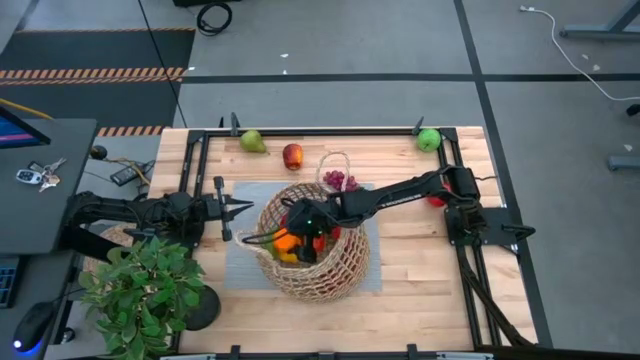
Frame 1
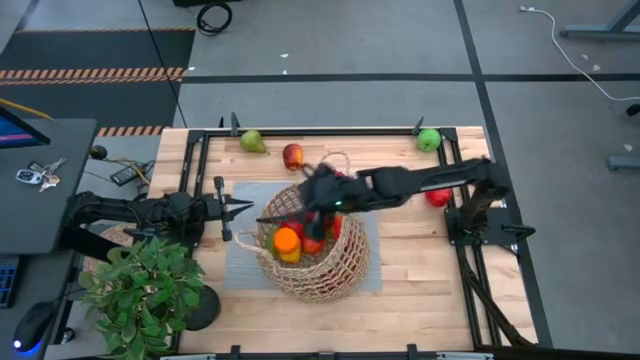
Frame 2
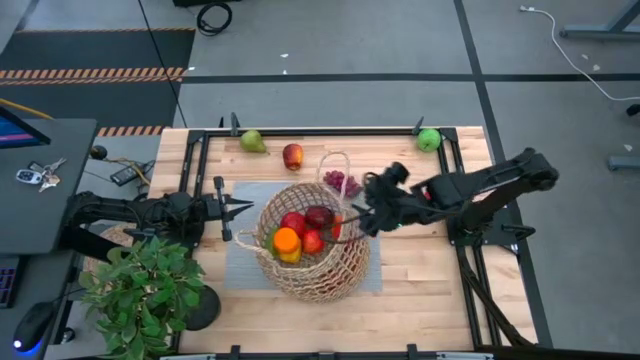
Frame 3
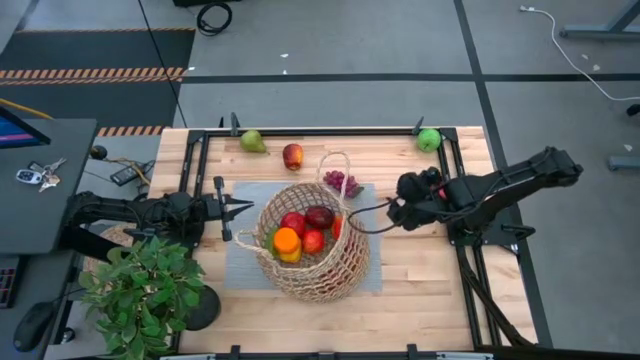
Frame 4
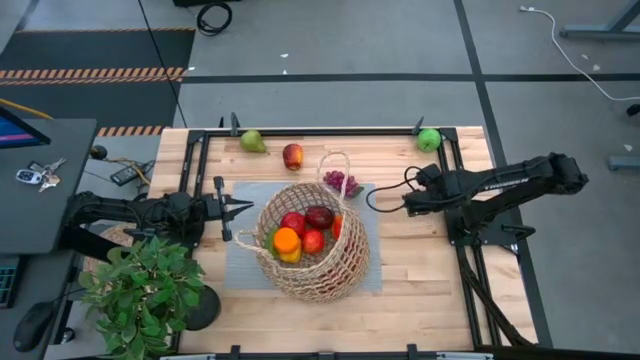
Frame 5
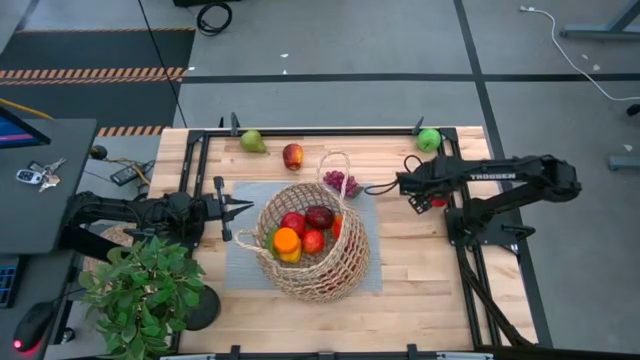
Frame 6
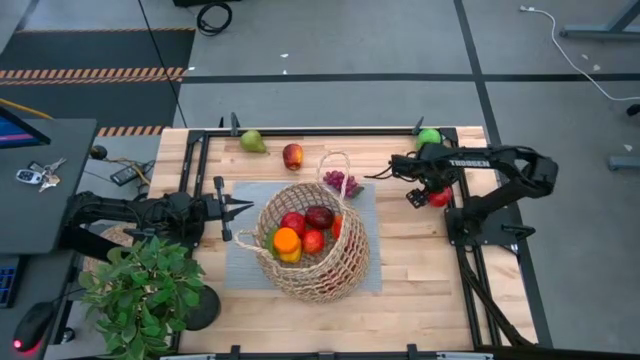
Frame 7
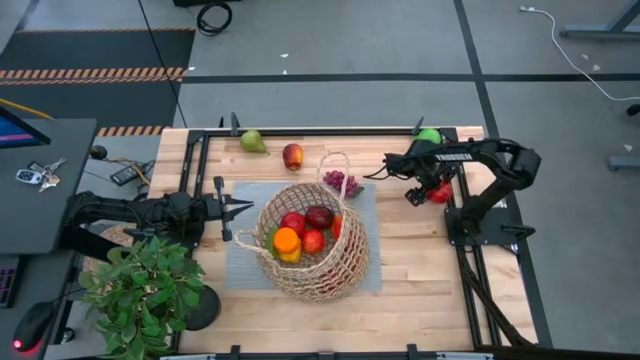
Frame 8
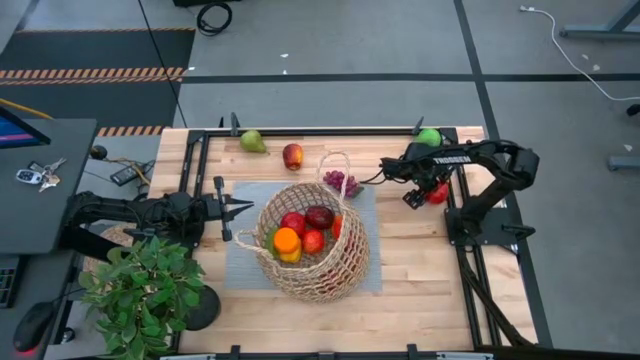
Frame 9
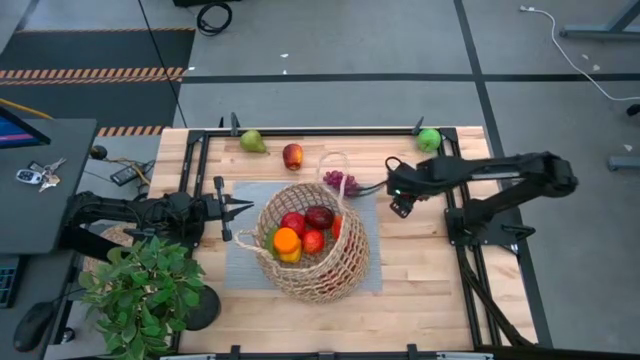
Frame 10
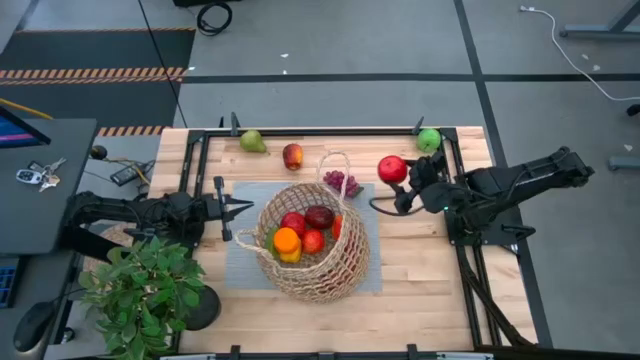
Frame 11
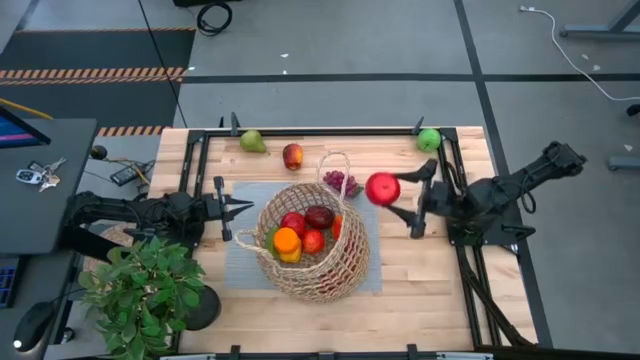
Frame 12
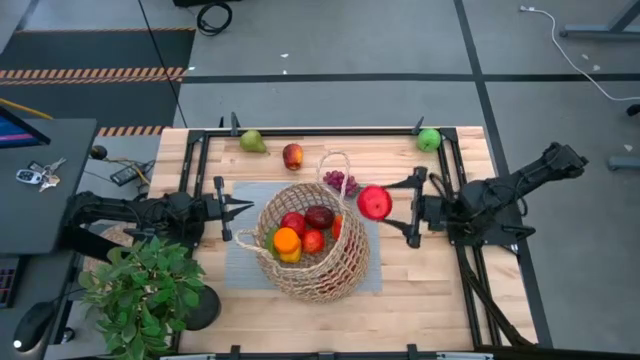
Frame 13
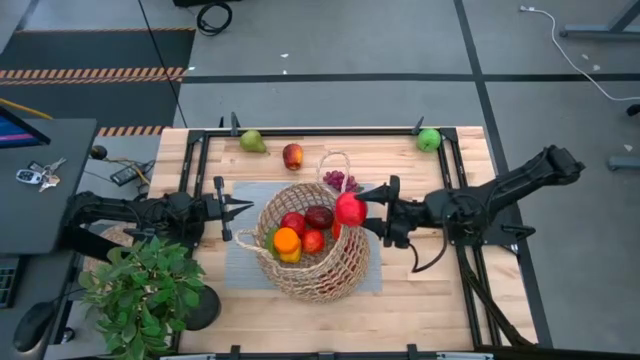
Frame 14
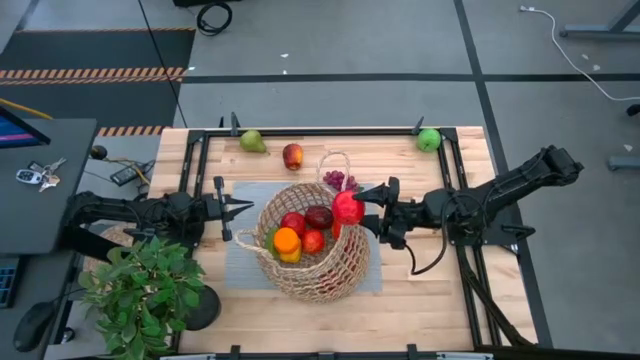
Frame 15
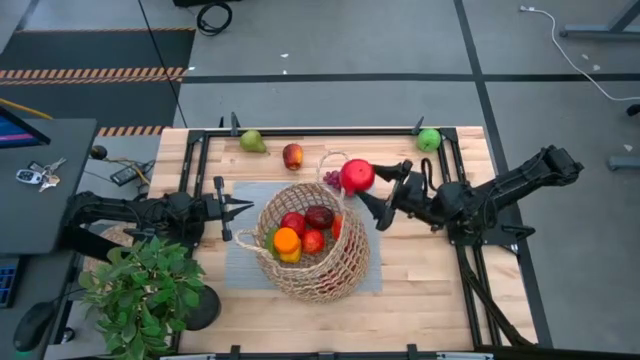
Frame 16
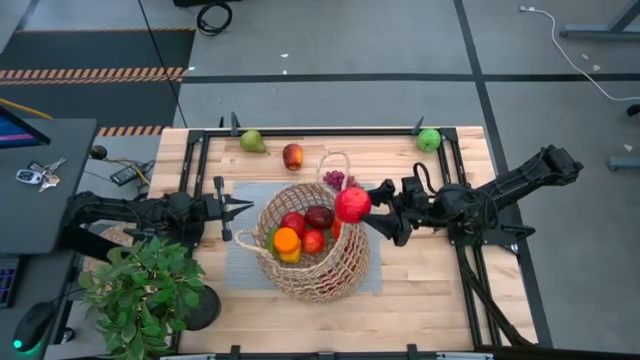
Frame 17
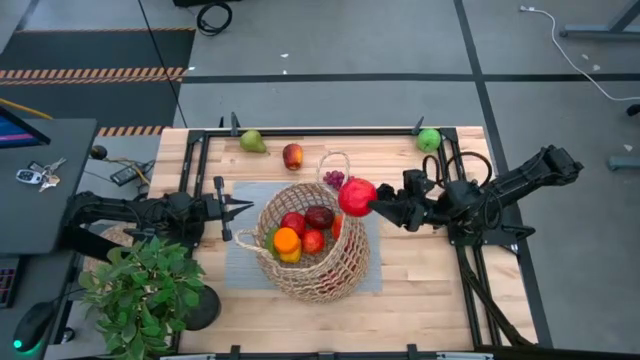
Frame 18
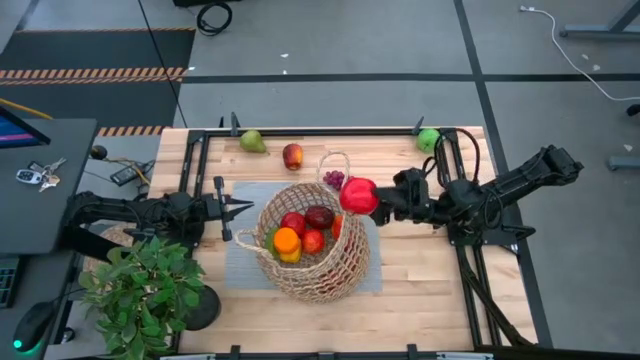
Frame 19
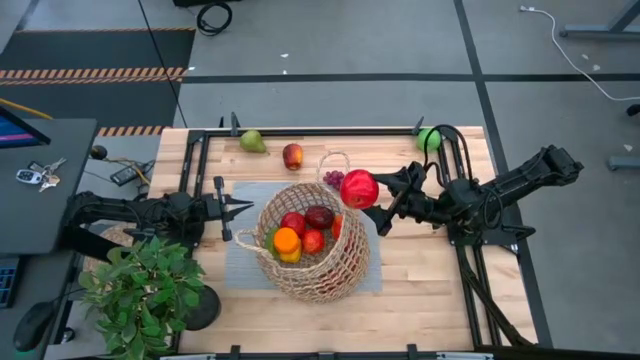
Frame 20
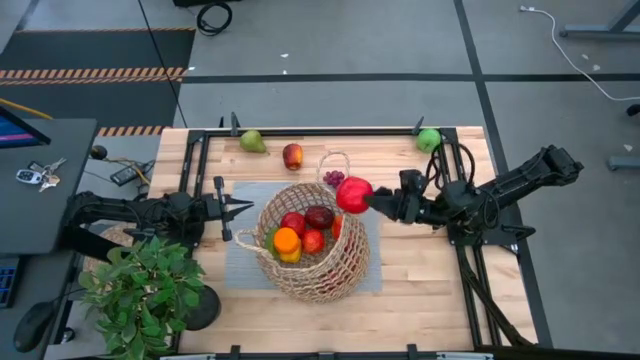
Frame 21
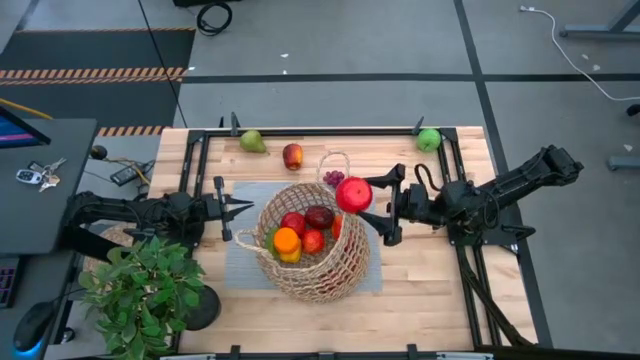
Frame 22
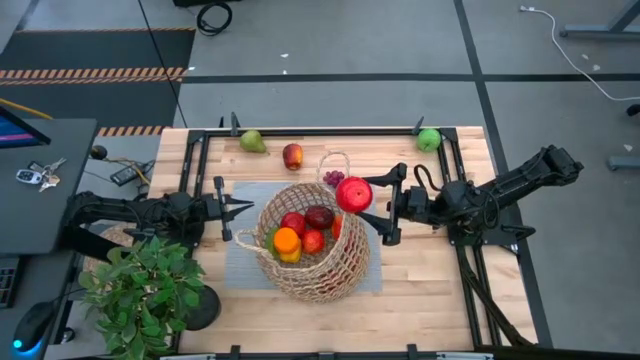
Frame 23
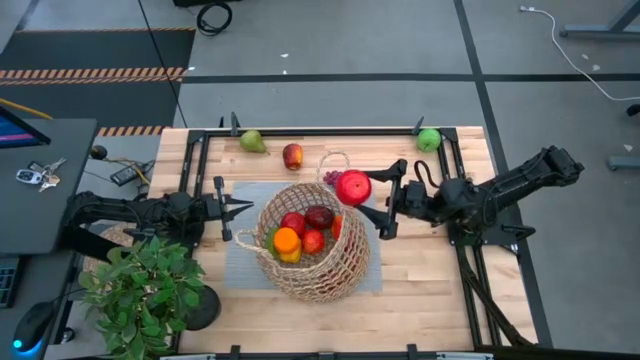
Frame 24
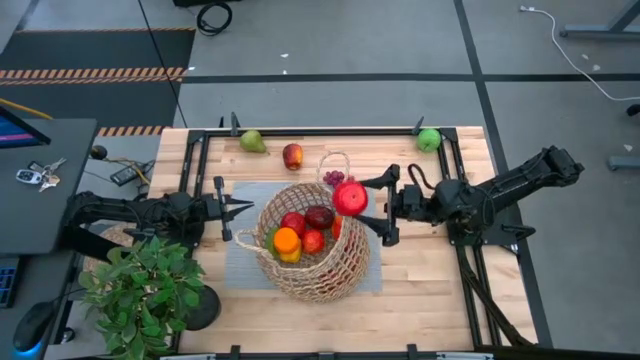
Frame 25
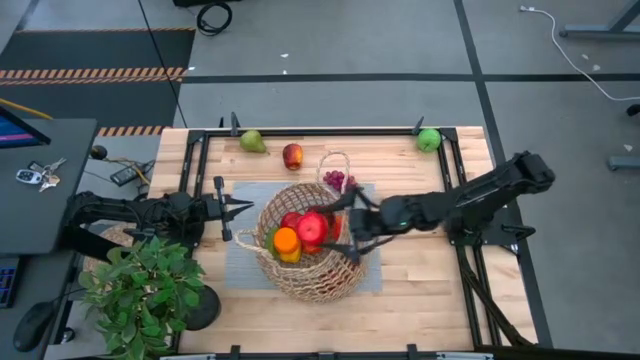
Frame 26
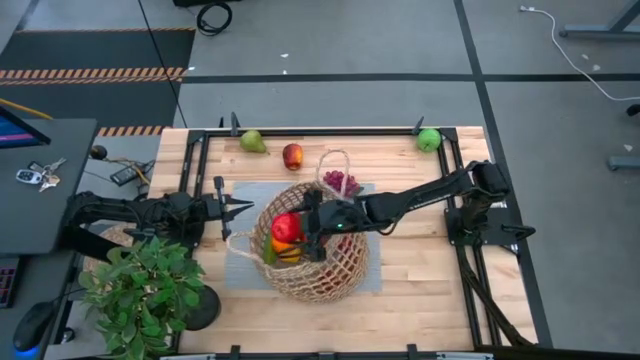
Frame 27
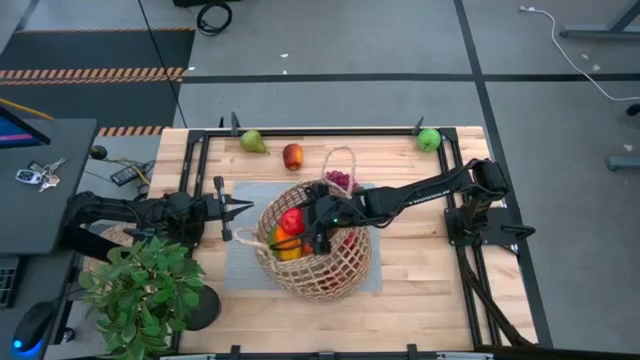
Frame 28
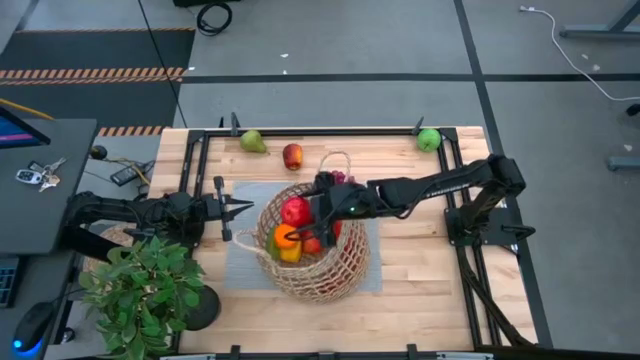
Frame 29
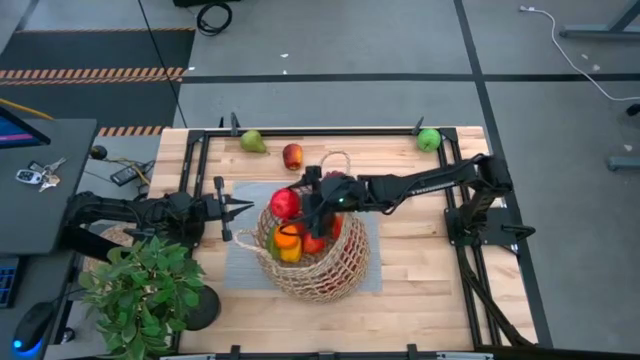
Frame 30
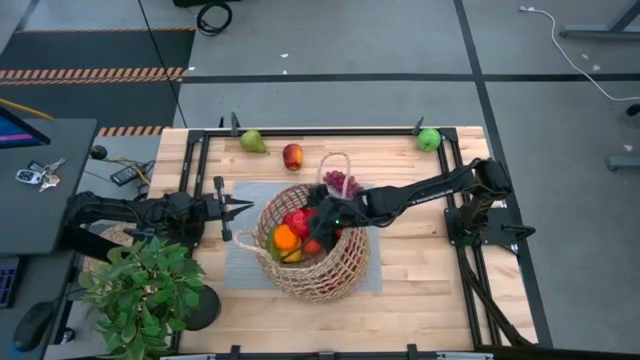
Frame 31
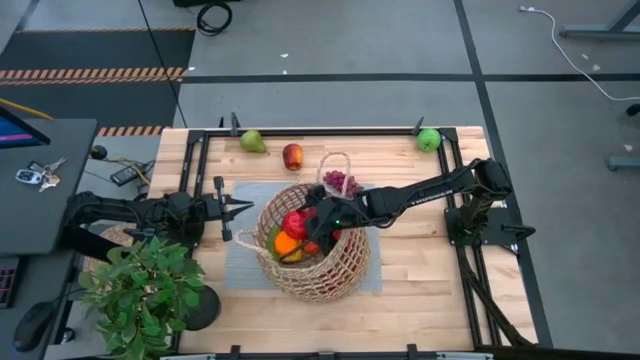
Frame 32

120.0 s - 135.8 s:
Task: Build produce basket
Put the red apple into the brown basket

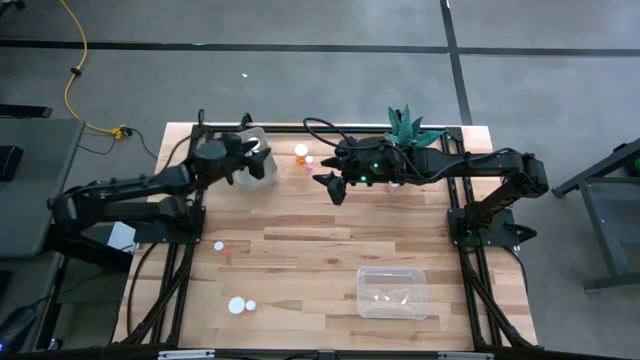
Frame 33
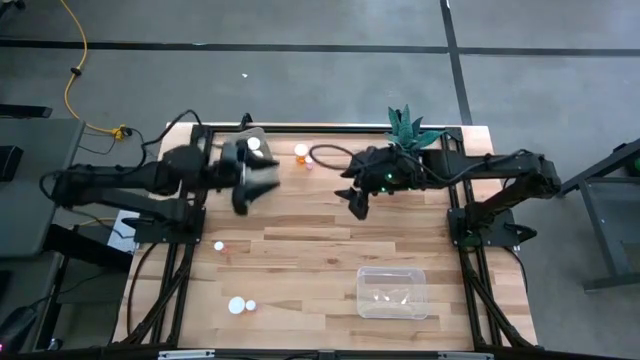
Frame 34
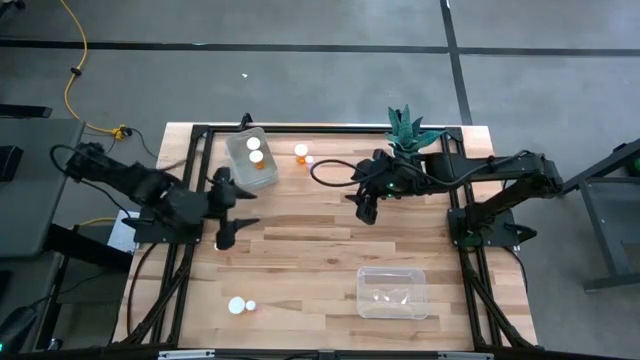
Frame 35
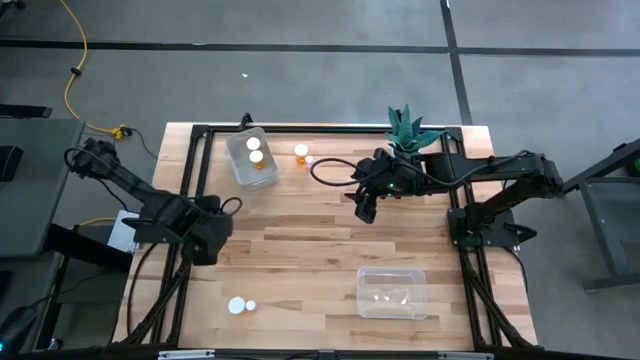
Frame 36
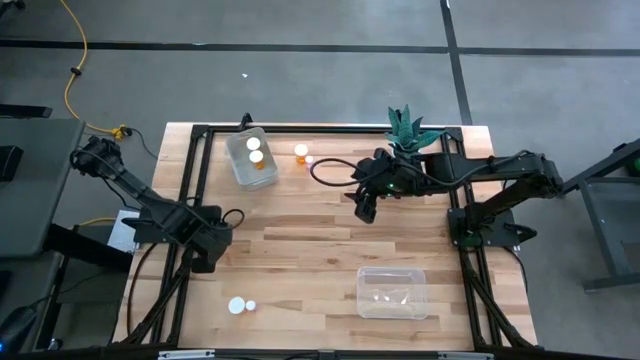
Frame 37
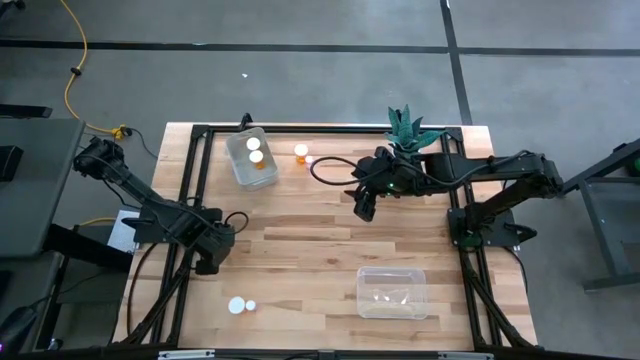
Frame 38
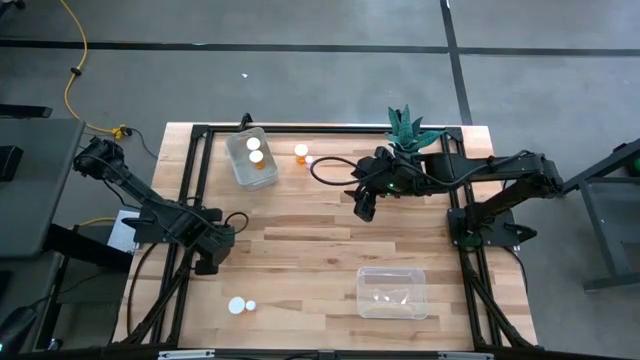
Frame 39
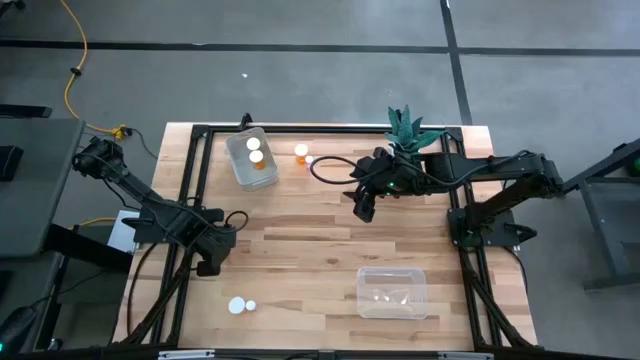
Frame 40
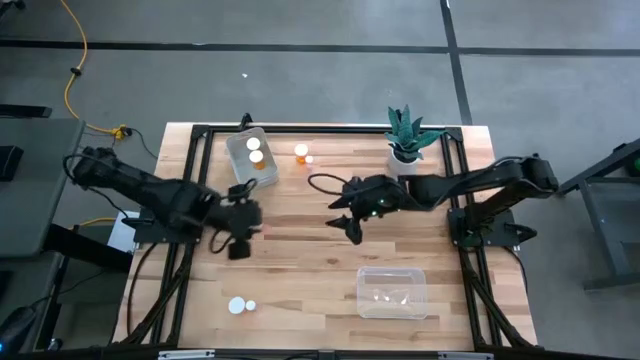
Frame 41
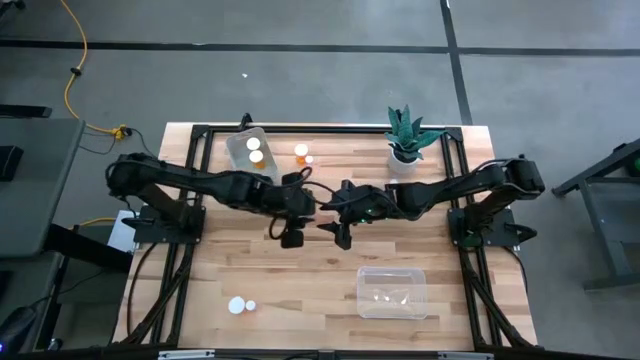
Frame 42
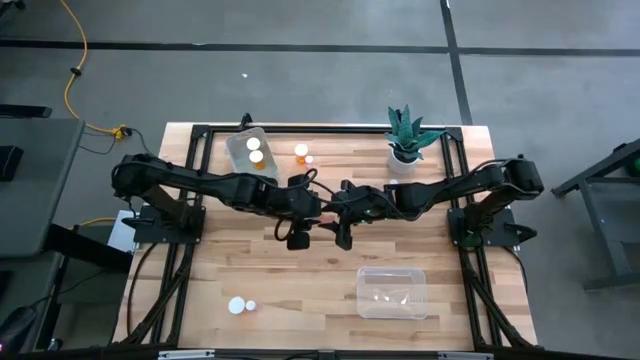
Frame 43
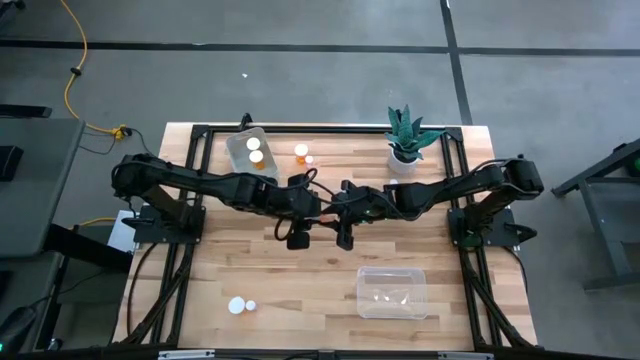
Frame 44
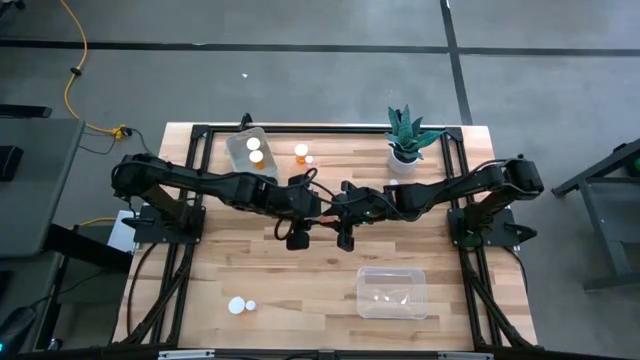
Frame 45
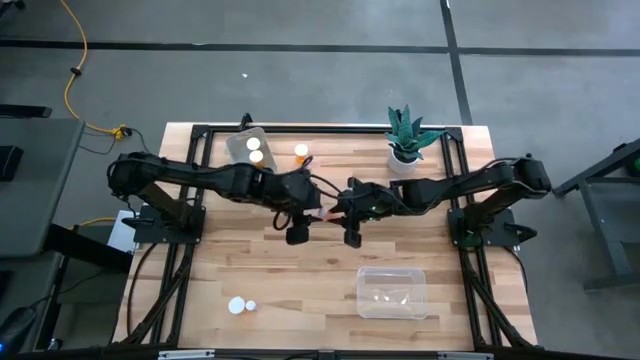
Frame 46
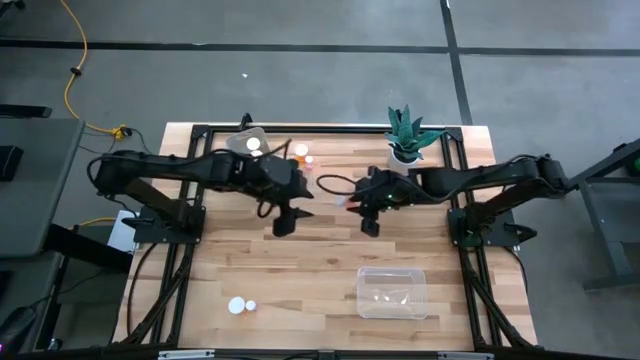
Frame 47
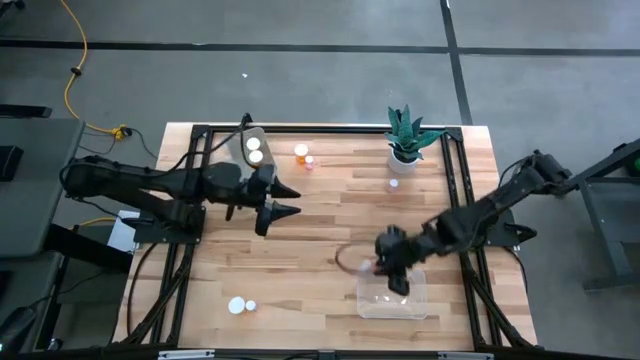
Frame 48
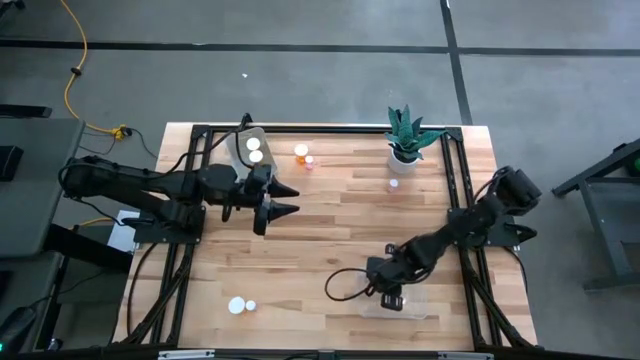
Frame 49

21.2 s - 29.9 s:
Task: Pick and place medicine bottles into bin by pill shape (circle, oval)
Put the small red pill bottle into the transparent bin
